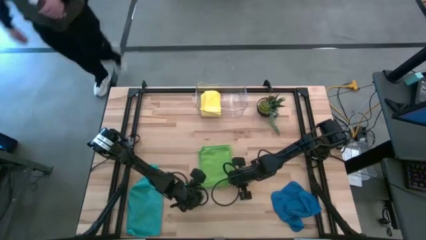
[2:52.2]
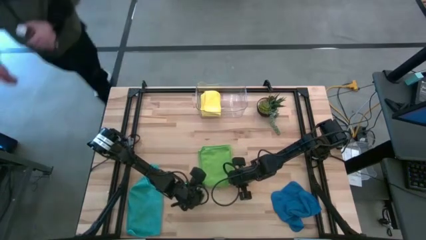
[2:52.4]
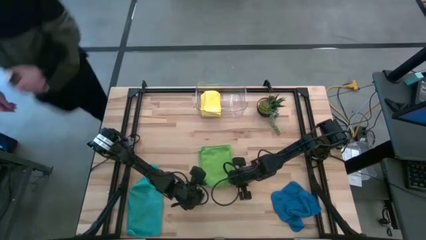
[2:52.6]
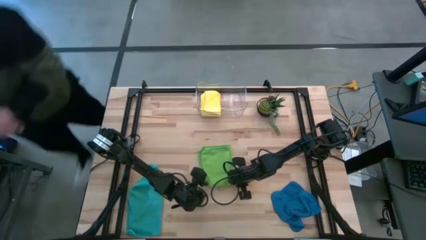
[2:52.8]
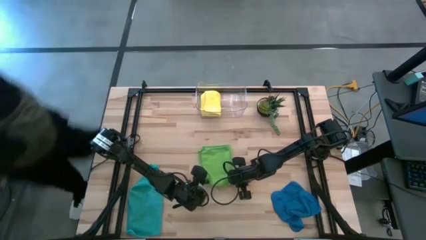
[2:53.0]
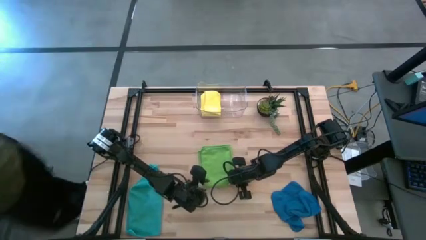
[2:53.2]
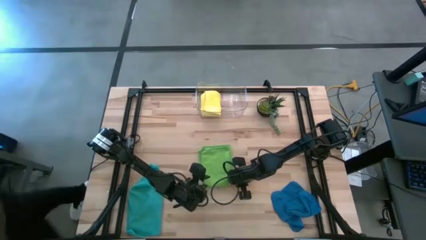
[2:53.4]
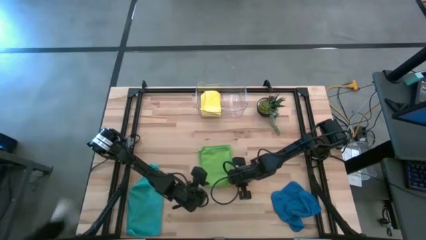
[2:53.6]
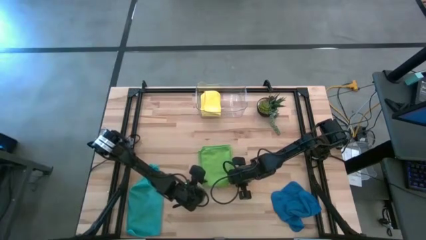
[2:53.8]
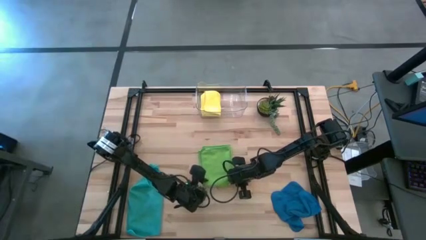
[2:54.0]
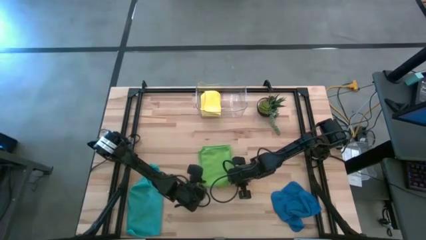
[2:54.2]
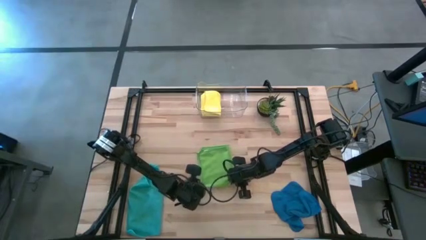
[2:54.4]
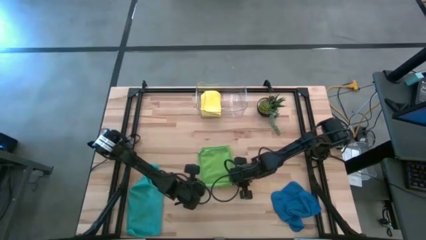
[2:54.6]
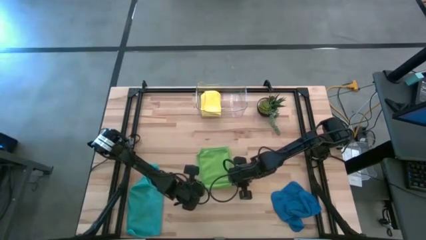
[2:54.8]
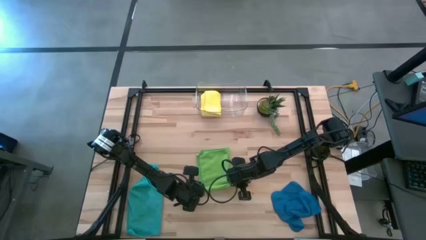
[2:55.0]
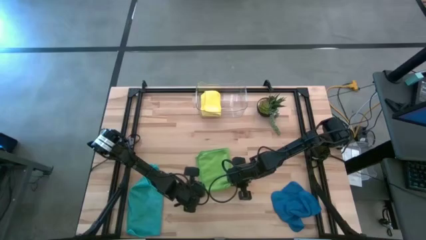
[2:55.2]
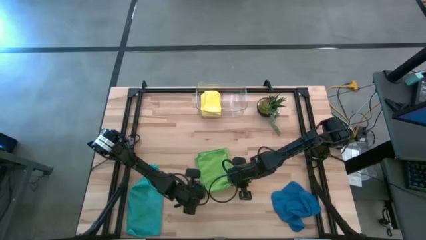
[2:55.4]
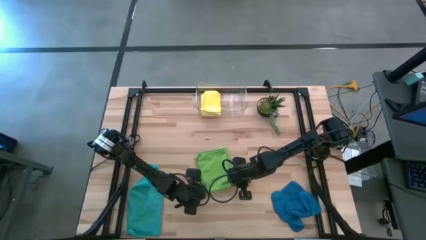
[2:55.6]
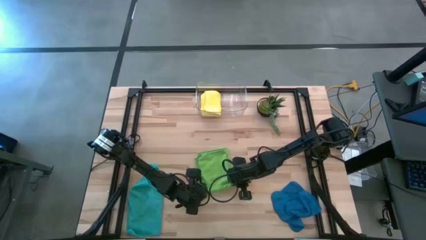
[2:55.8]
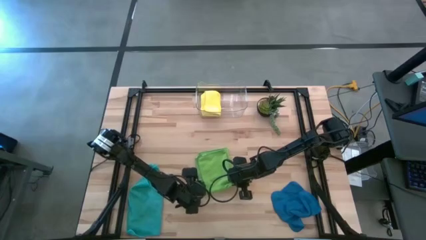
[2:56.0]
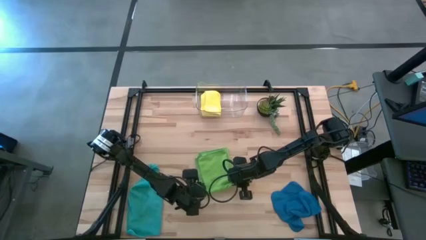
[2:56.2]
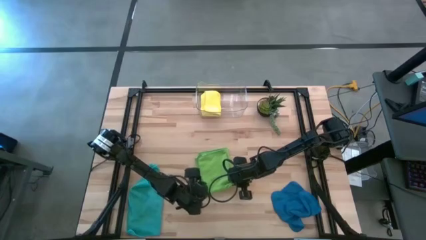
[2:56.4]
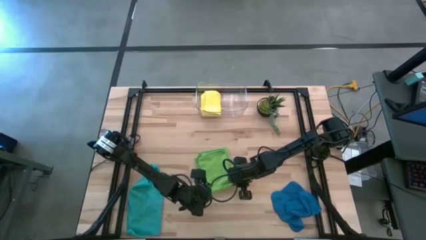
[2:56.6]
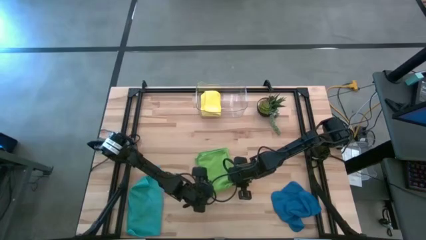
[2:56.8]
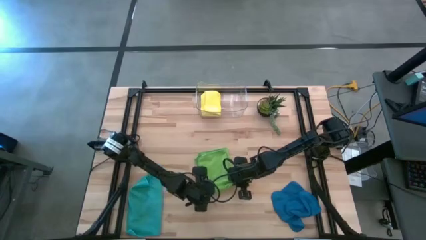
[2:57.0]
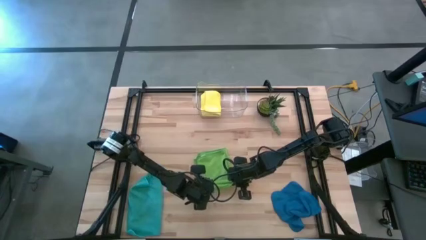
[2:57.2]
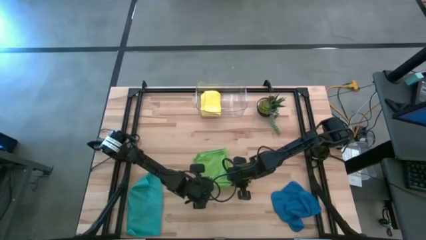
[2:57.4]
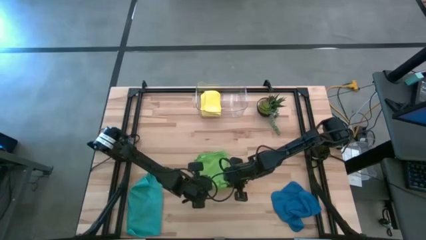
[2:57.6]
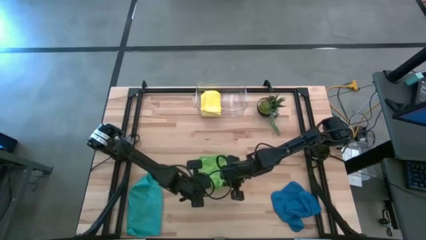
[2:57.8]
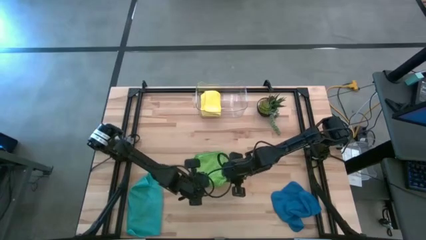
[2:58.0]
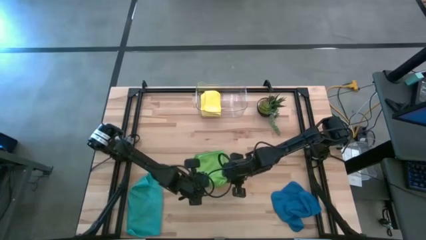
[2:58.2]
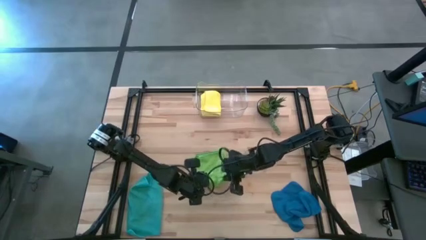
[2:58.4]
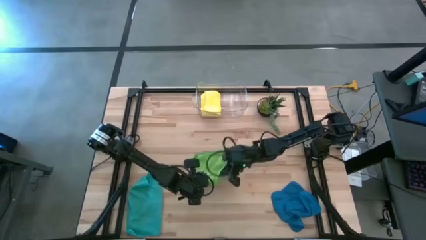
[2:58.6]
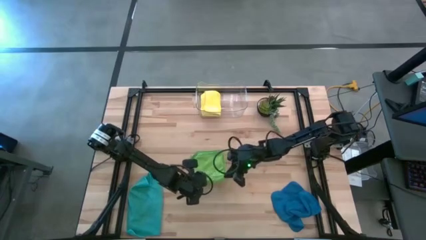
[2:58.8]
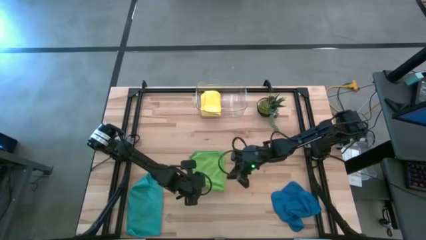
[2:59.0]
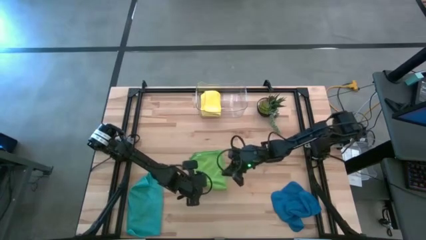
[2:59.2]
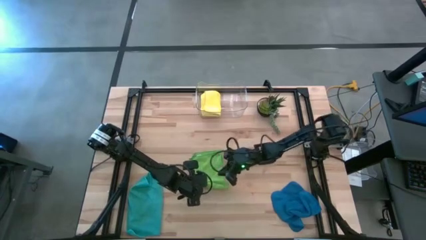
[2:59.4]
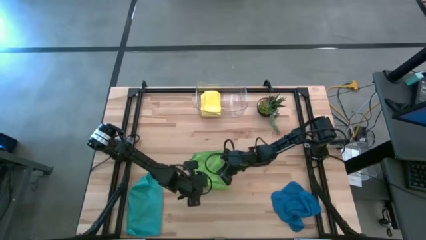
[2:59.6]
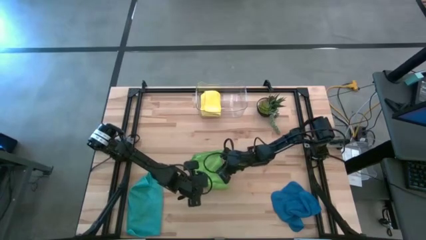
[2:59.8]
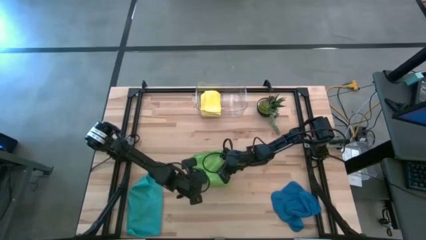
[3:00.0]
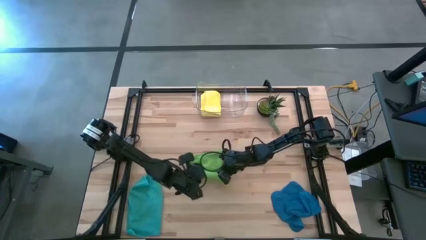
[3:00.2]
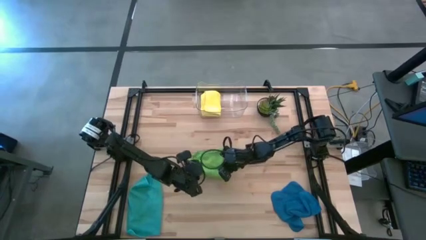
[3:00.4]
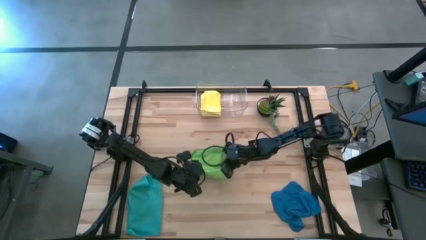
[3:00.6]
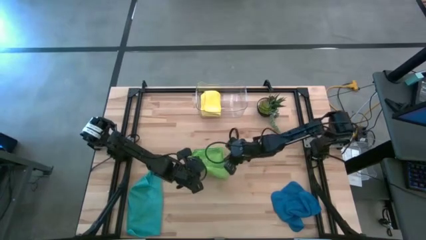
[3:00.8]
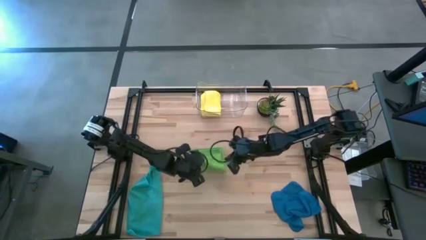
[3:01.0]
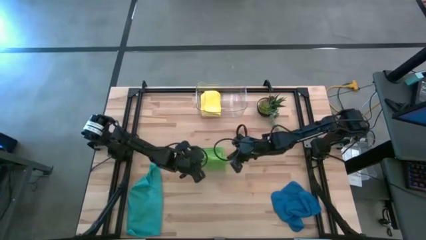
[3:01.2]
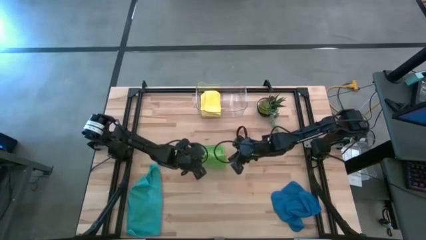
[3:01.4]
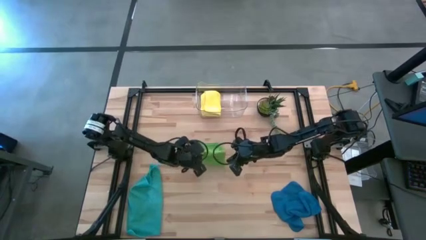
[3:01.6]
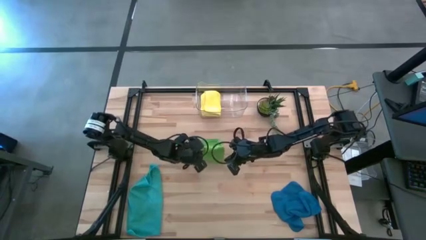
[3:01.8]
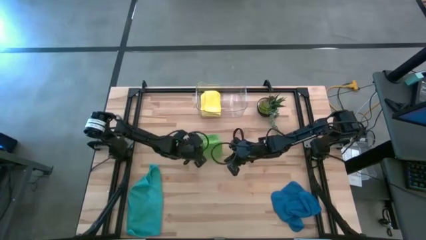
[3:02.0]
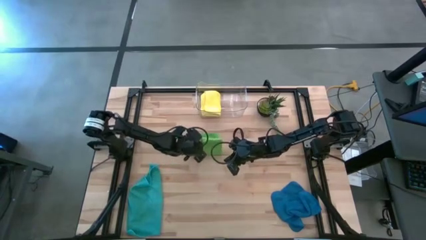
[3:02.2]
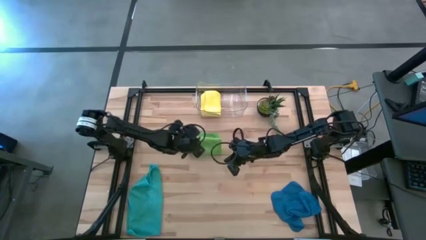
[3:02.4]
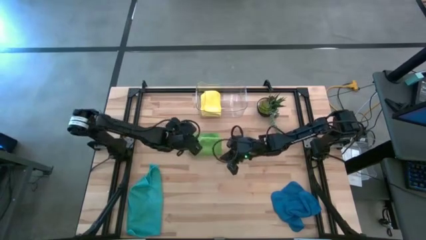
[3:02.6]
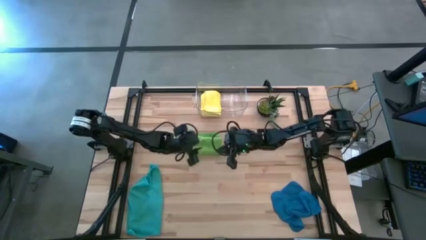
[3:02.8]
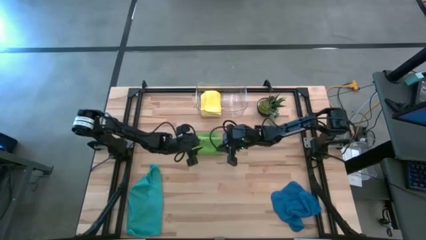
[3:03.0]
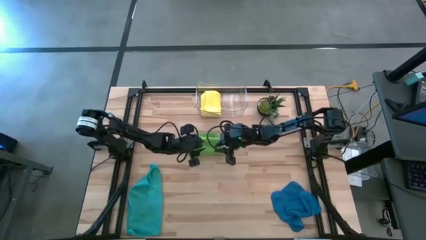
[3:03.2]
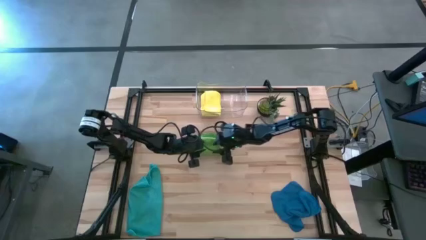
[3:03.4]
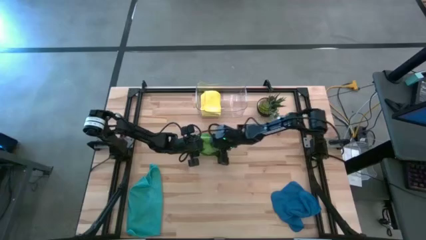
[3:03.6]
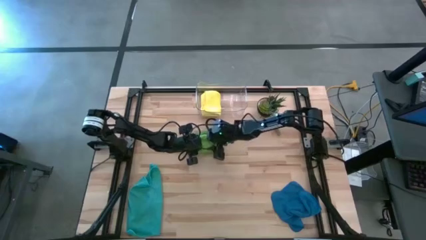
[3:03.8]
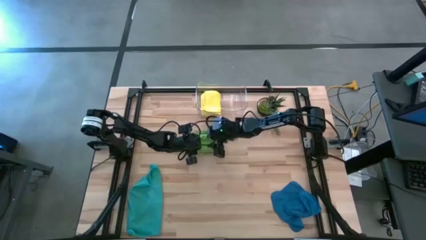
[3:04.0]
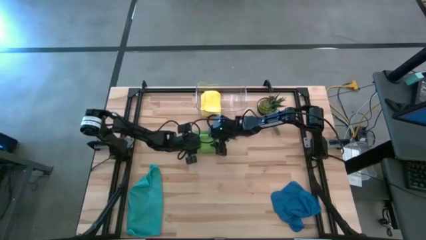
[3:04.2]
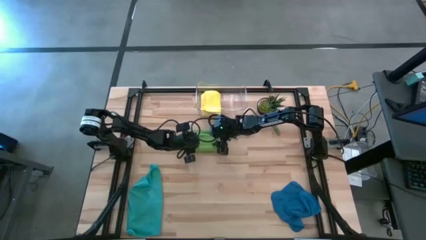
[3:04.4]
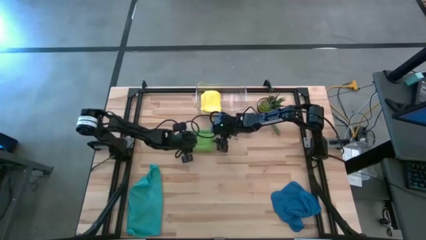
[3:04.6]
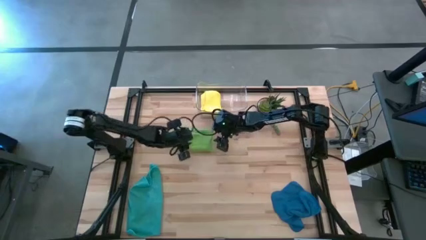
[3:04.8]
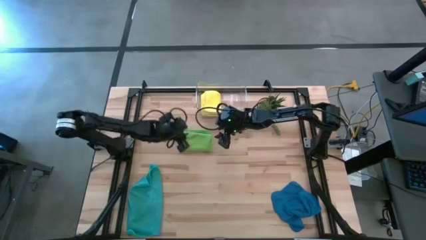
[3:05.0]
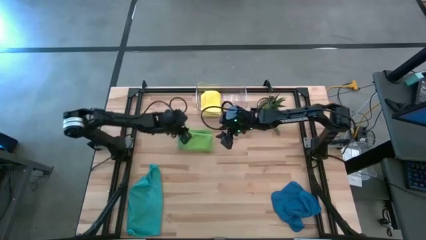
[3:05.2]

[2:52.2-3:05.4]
Task: Fold microfiber towels
Fold the green microfiber towel

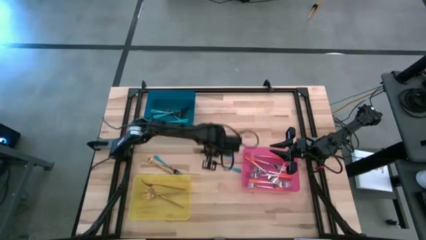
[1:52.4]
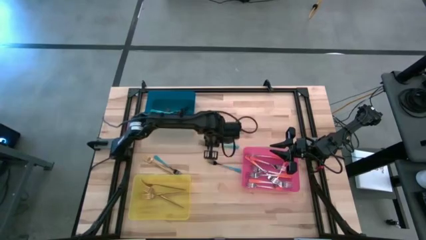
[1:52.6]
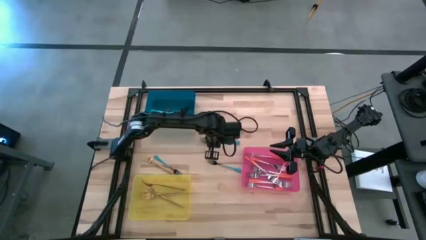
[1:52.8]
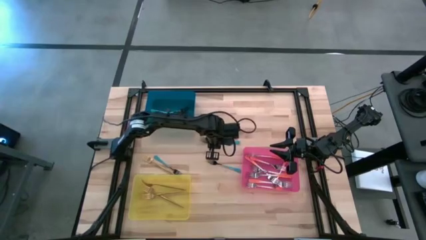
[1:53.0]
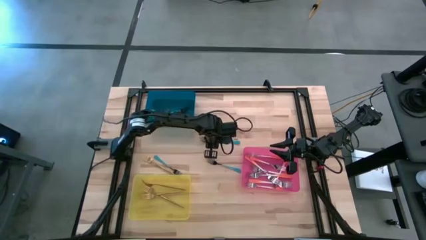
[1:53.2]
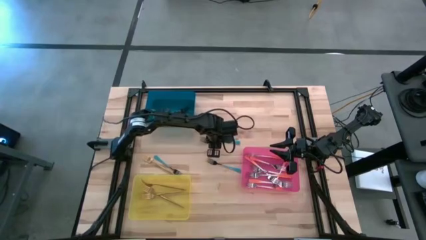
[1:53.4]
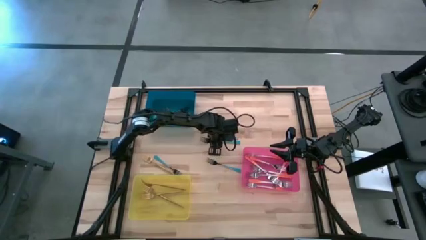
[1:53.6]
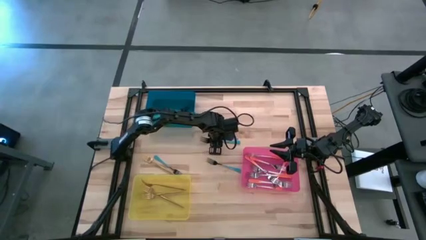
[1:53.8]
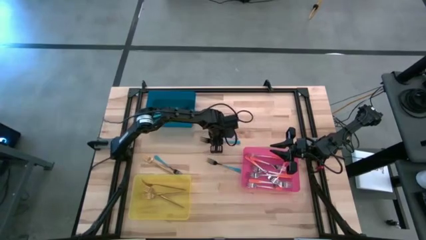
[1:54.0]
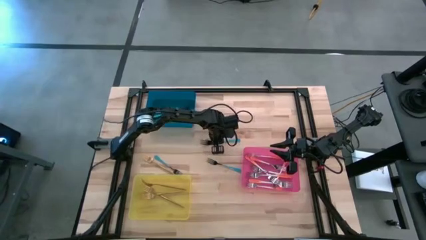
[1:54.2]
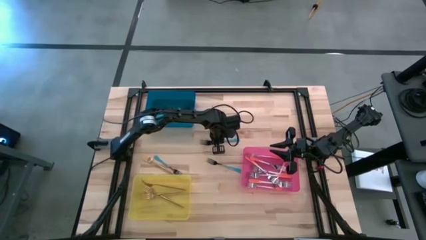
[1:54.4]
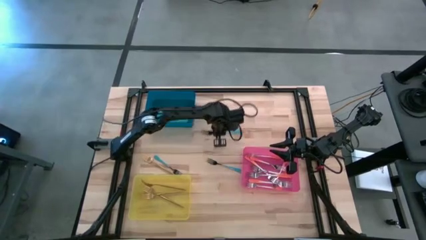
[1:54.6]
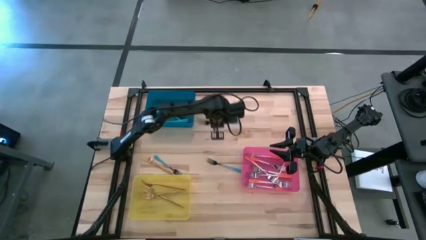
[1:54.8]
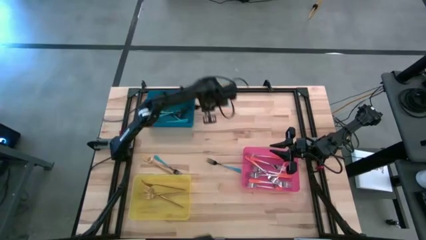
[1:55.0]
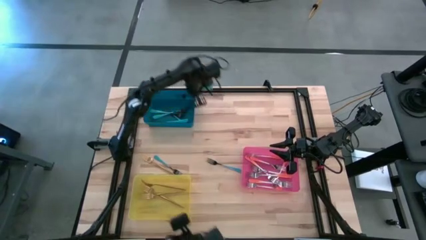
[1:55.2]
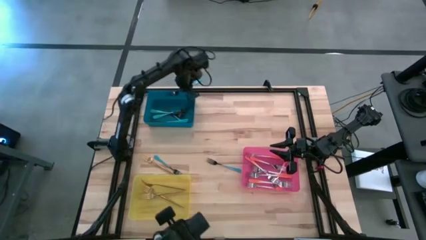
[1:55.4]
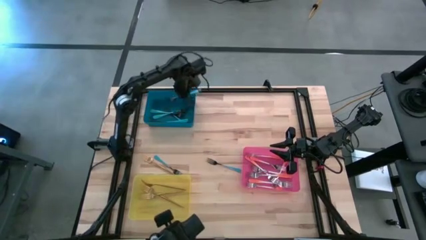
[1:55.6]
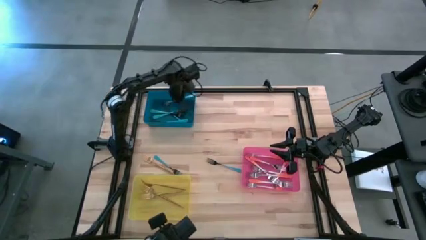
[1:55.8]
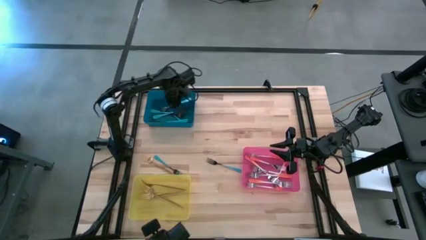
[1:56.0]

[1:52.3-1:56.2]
Task: Sort silverware by color (type)
Put the blue fork into the blue bin
